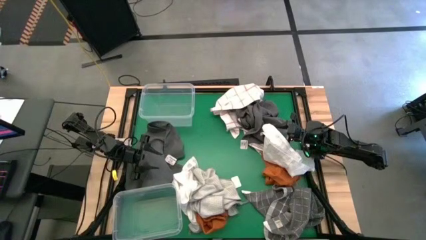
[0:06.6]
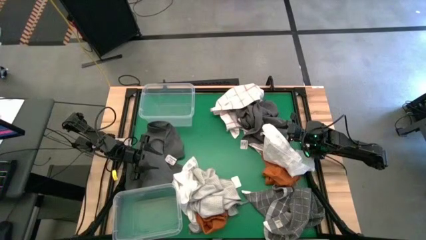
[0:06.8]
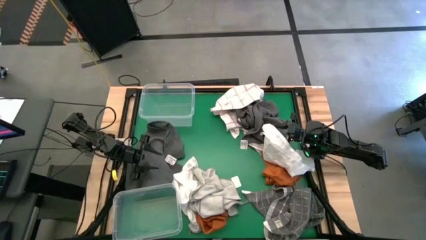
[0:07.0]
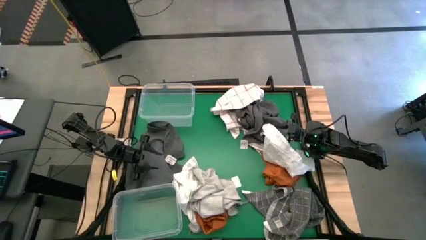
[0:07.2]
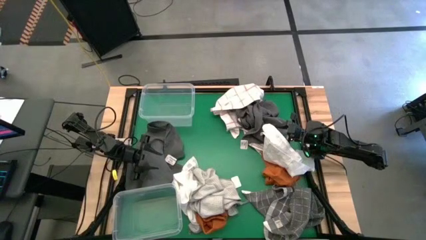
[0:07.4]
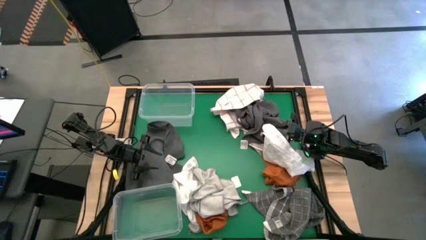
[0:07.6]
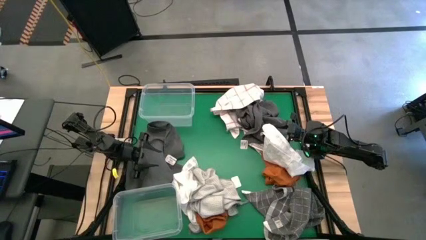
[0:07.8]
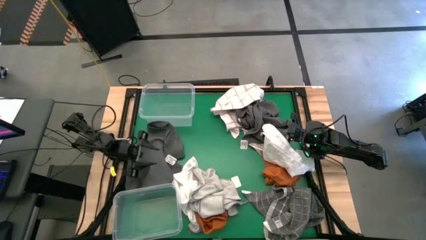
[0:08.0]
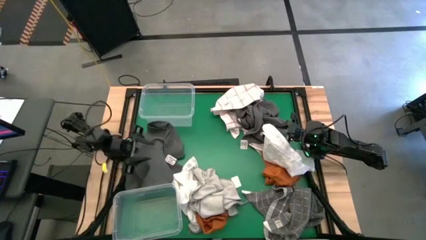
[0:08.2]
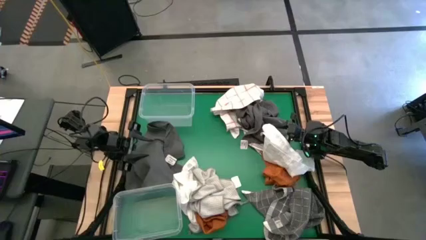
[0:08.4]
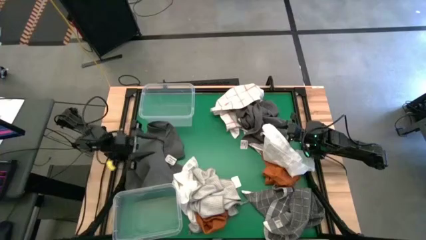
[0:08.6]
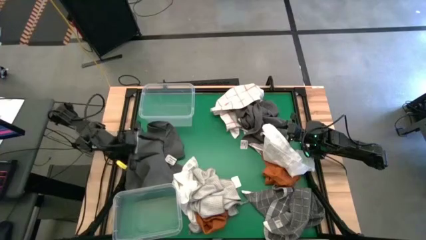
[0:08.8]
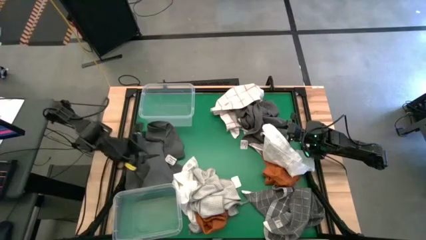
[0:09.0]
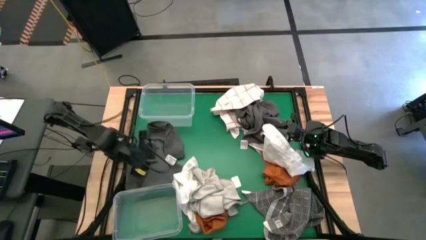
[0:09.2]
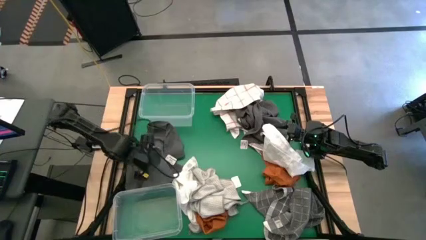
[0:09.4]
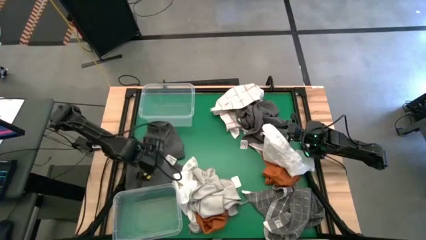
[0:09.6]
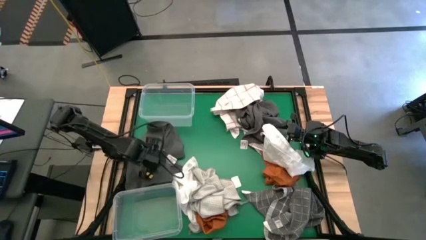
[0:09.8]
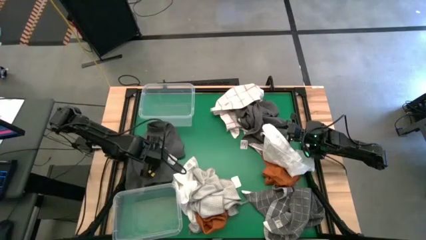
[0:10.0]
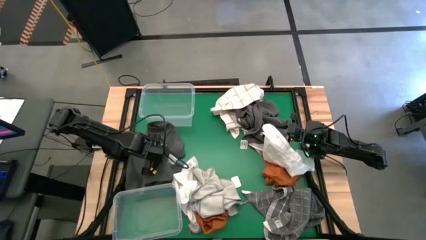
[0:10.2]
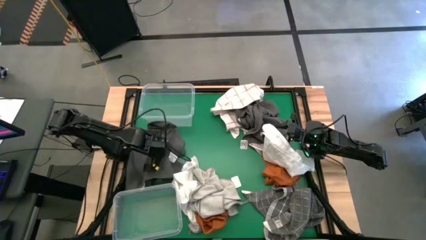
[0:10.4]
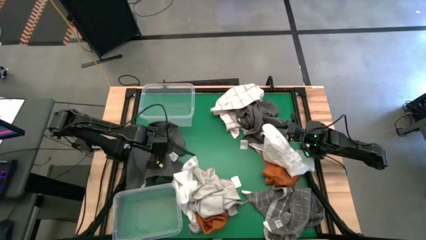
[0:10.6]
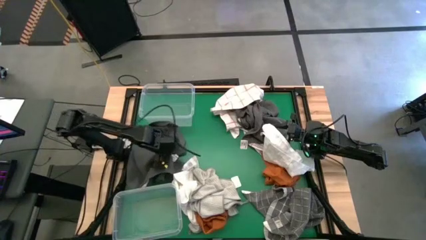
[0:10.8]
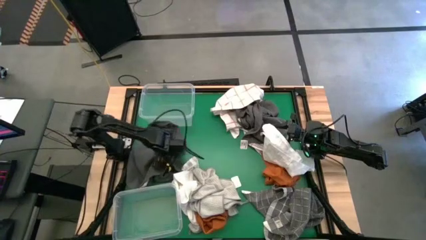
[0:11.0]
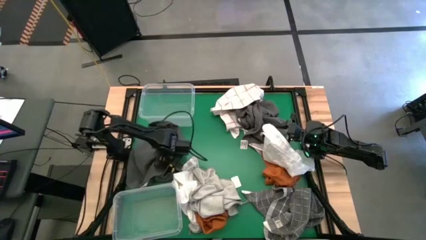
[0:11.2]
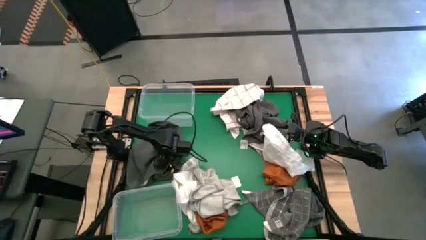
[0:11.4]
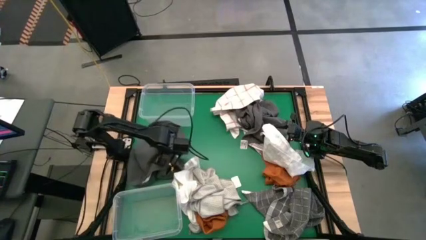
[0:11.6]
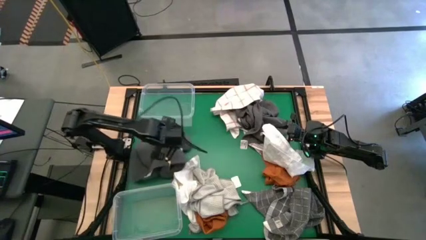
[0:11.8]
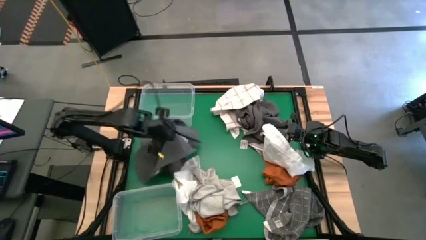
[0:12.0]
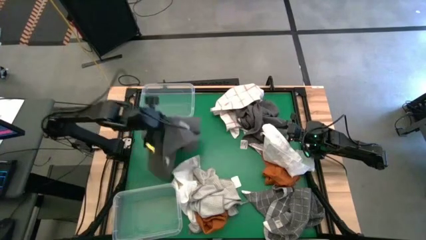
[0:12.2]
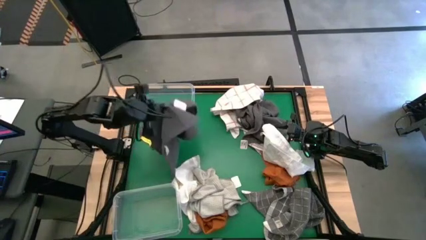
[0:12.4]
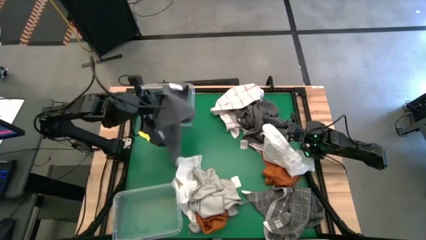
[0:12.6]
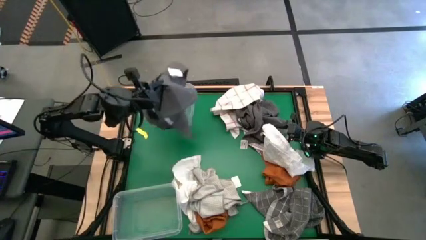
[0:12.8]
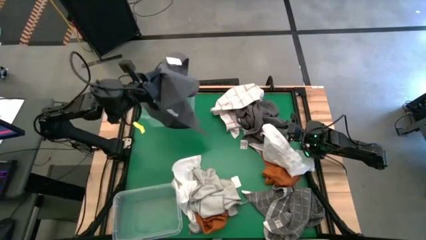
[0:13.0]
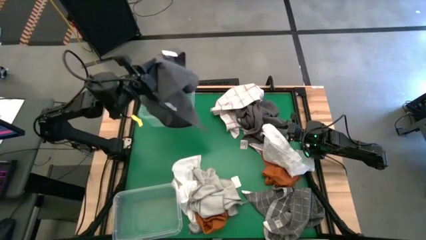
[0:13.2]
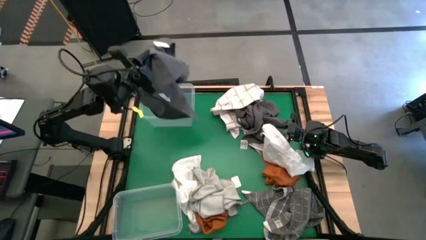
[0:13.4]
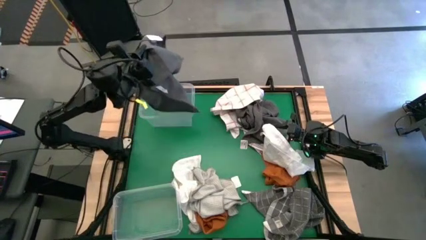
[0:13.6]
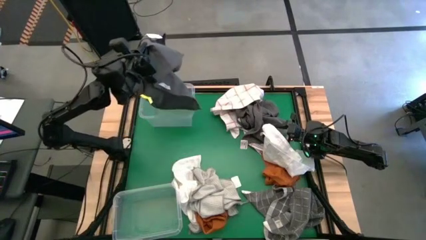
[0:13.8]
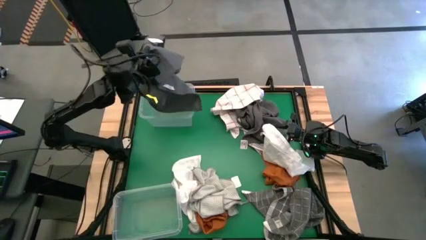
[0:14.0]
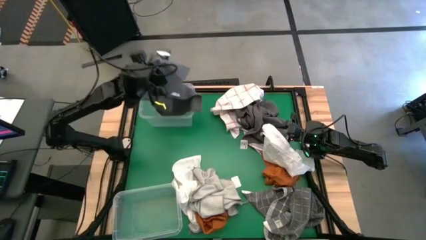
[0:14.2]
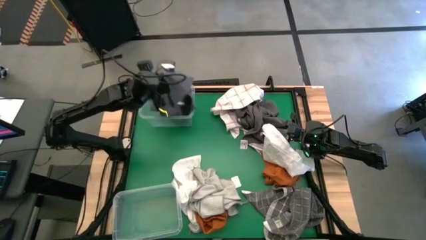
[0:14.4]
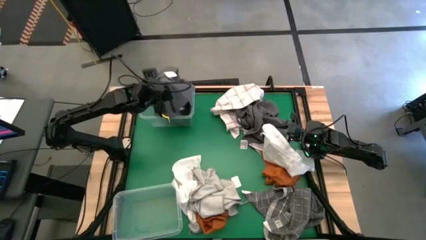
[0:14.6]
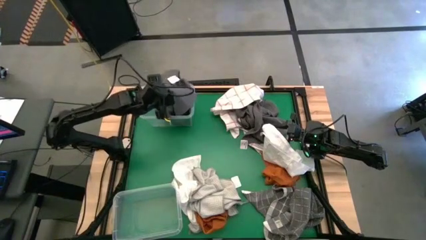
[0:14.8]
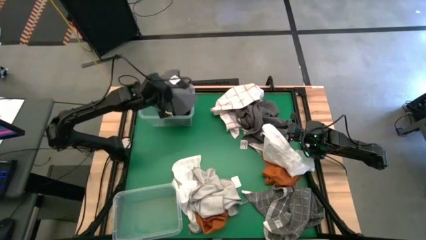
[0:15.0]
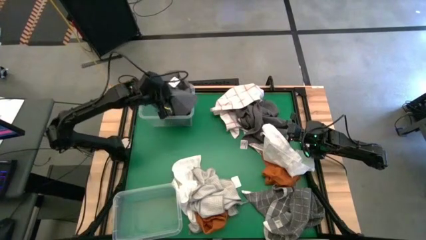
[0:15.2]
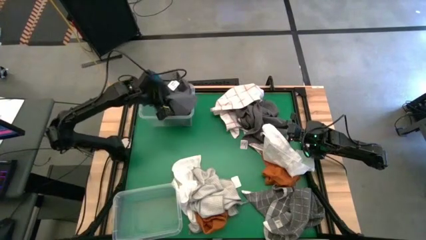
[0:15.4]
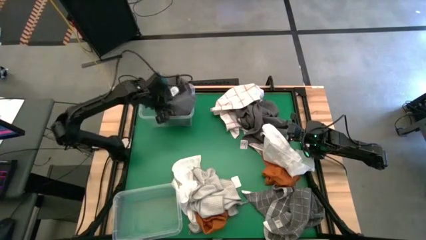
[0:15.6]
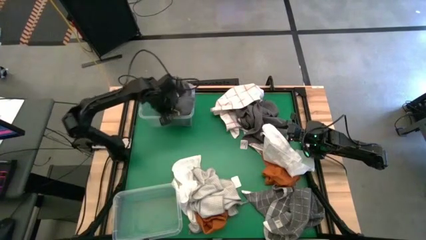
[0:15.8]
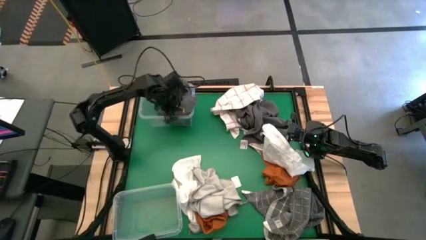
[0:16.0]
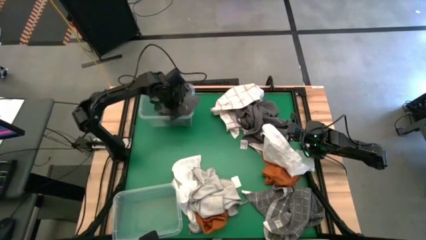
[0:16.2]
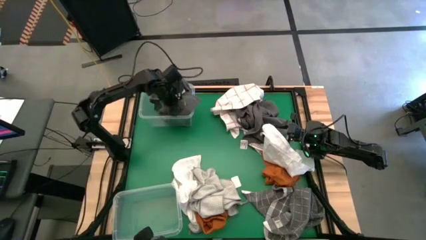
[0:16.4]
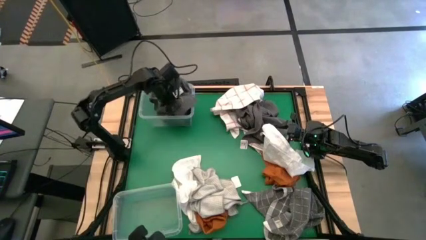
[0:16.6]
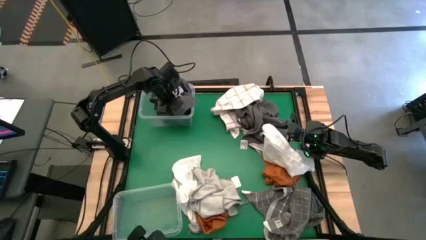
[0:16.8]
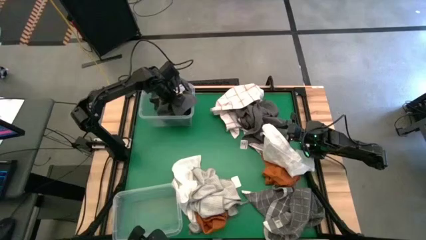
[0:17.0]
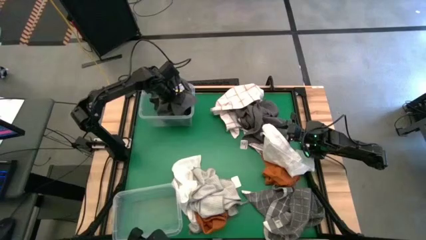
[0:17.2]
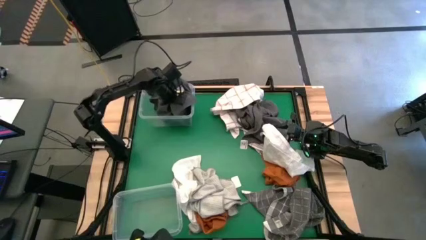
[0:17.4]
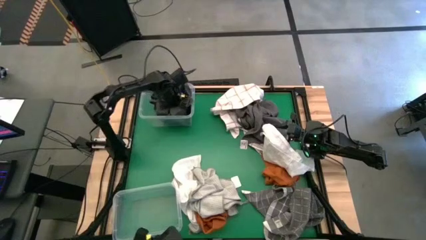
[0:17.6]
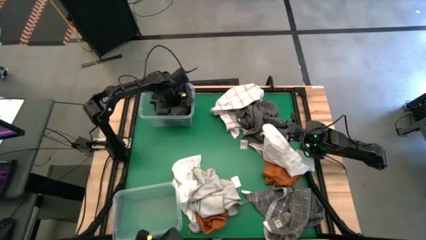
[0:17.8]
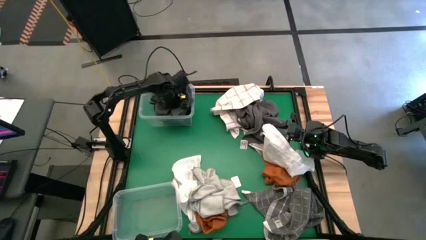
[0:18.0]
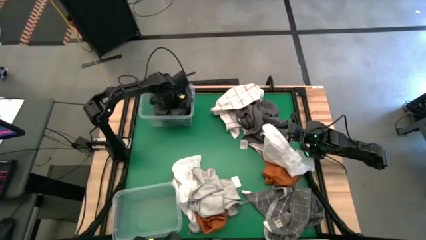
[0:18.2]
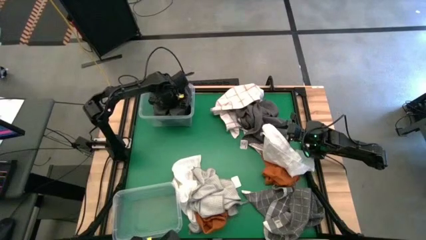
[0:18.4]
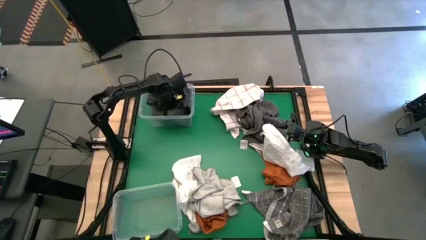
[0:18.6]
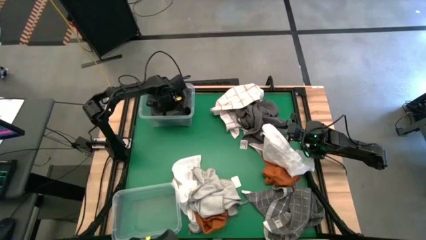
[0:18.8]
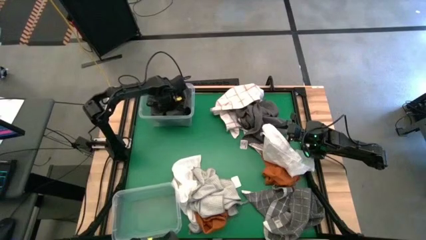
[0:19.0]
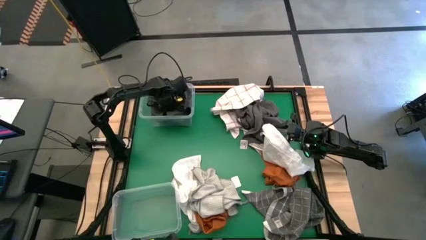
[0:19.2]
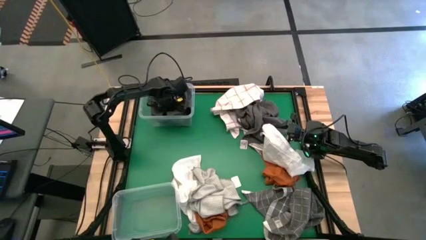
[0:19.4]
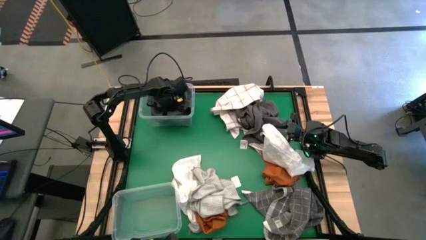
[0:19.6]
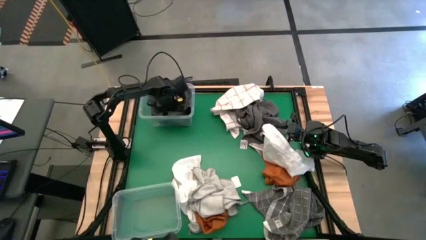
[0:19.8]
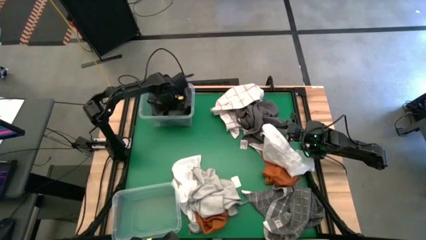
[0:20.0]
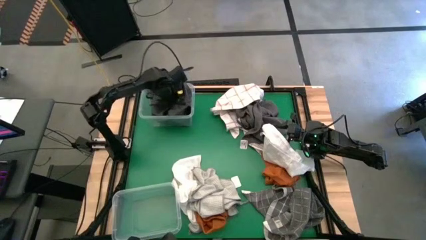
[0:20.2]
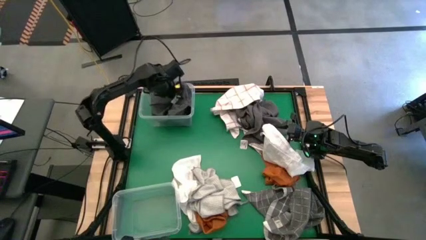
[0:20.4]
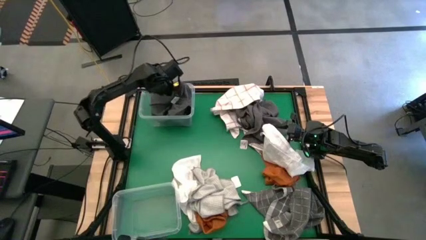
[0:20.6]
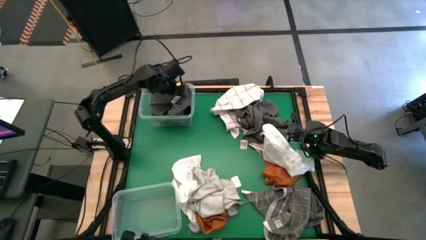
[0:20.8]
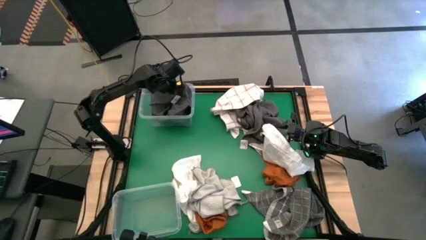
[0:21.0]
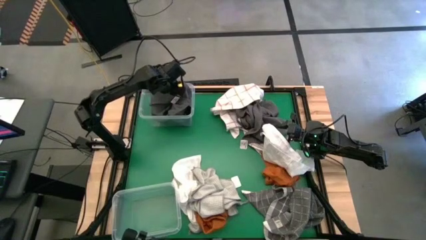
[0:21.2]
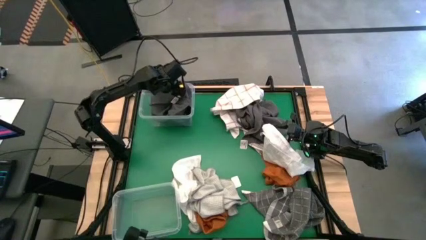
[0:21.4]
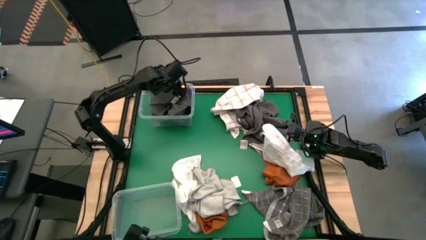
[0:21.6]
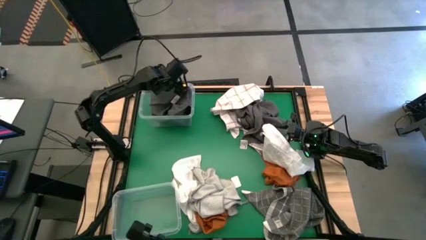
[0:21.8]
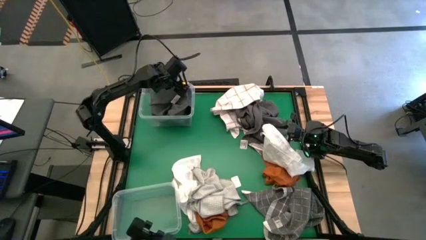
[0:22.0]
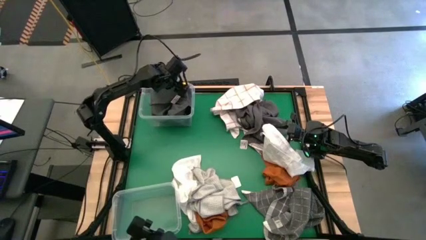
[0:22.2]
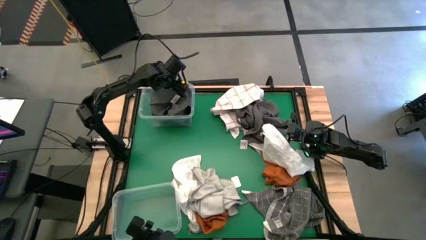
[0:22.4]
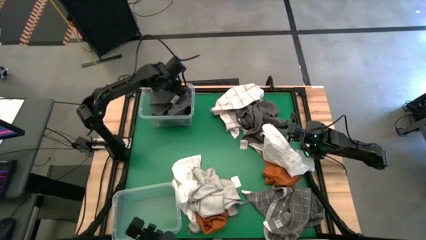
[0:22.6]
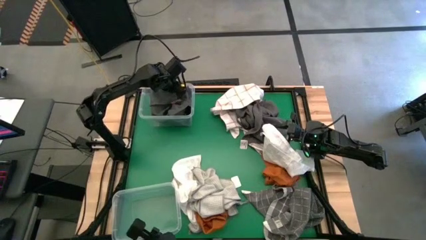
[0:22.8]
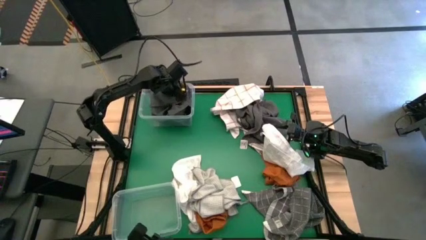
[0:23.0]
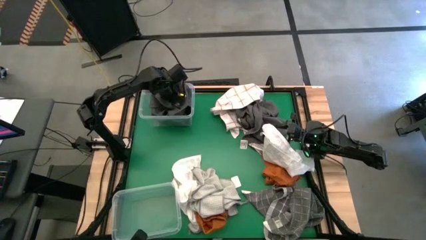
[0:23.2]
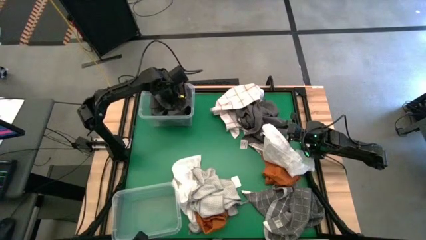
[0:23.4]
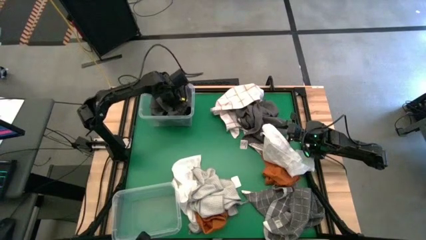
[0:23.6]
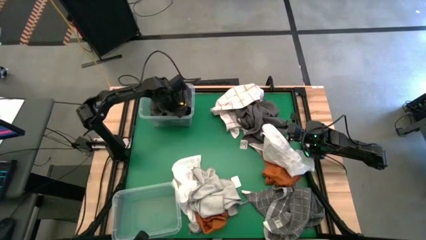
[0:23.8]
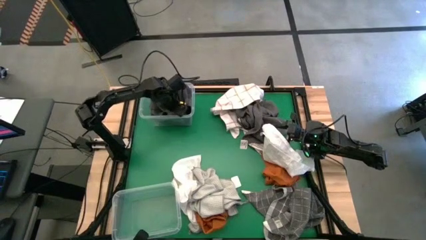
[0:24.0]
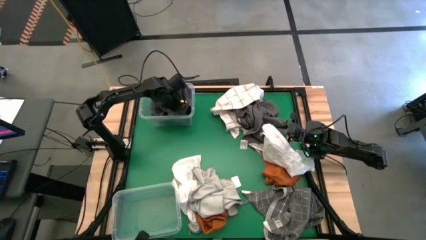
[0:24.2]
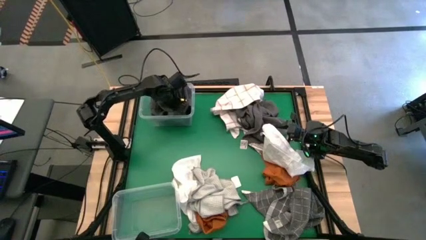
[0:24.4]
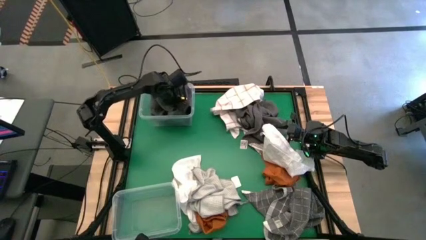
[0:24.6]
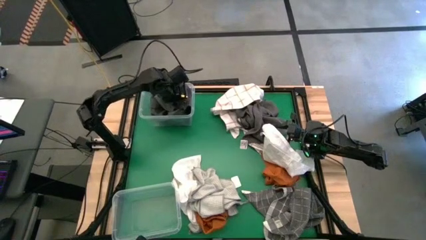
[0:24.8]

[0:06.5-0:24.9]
Task: Sort towels by color in basket
Put the black towel into the top transparent bin
